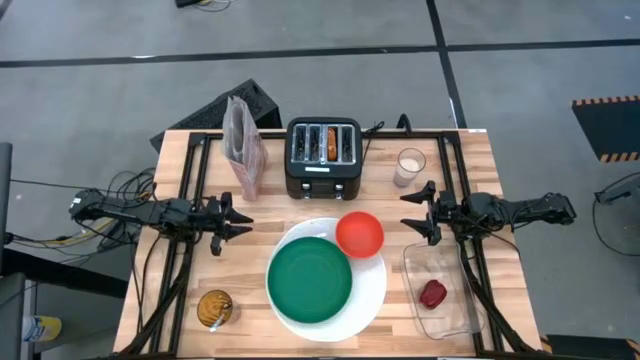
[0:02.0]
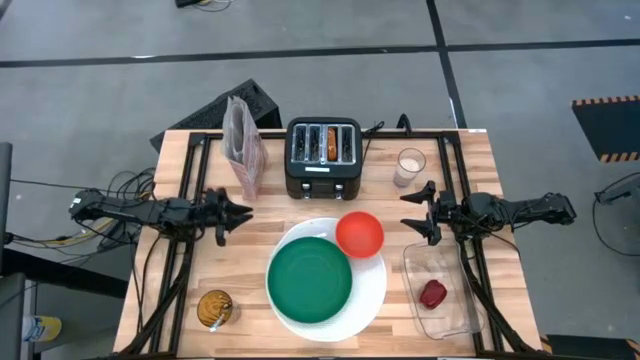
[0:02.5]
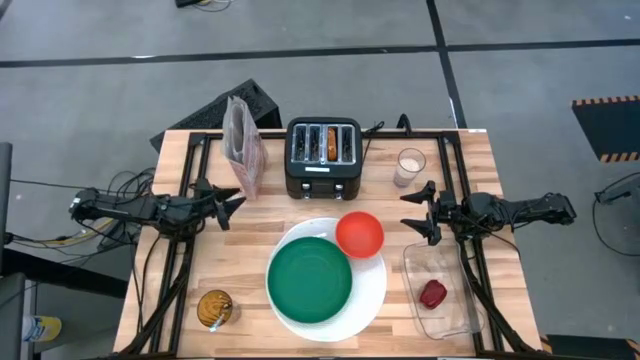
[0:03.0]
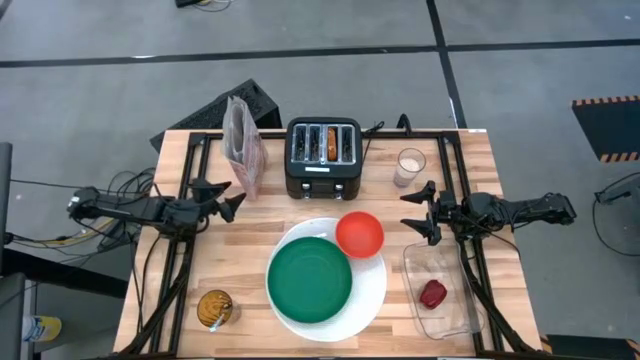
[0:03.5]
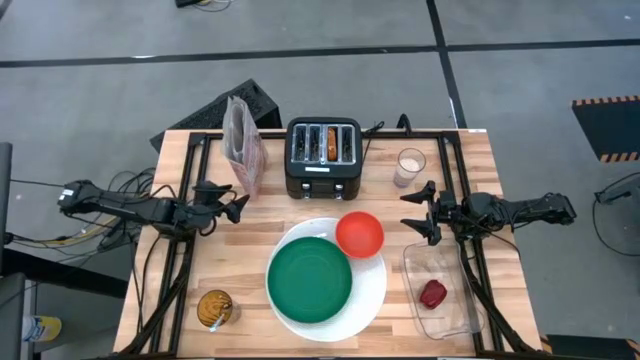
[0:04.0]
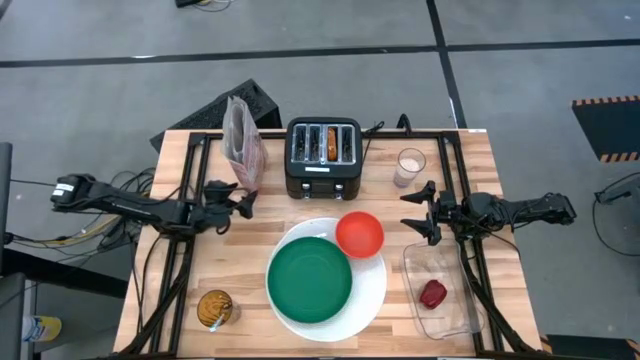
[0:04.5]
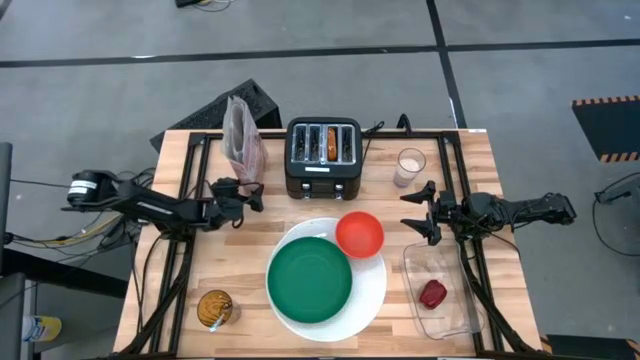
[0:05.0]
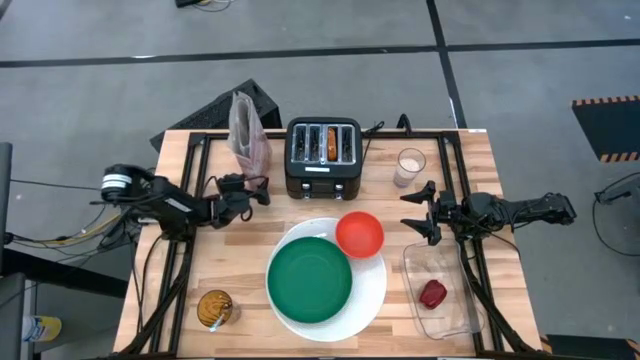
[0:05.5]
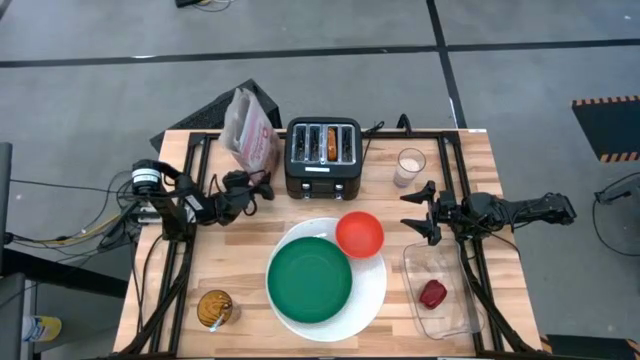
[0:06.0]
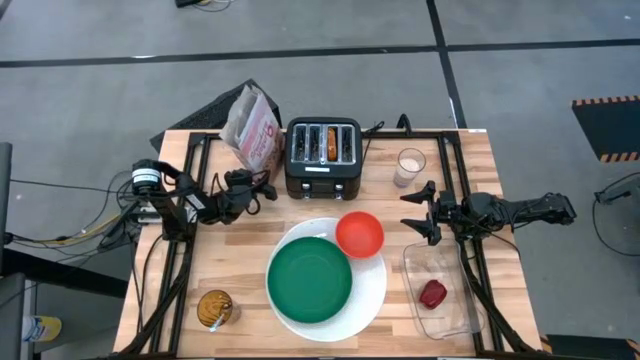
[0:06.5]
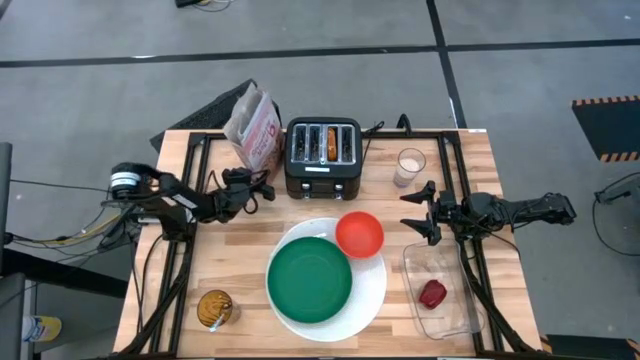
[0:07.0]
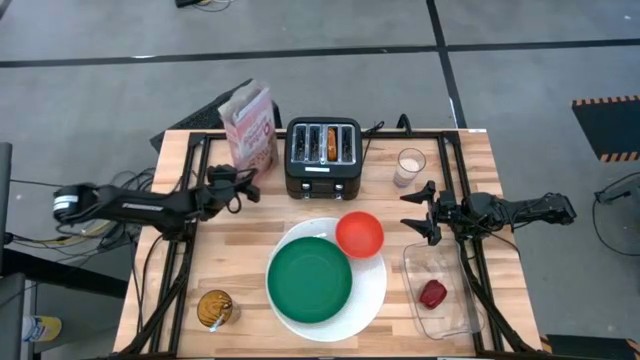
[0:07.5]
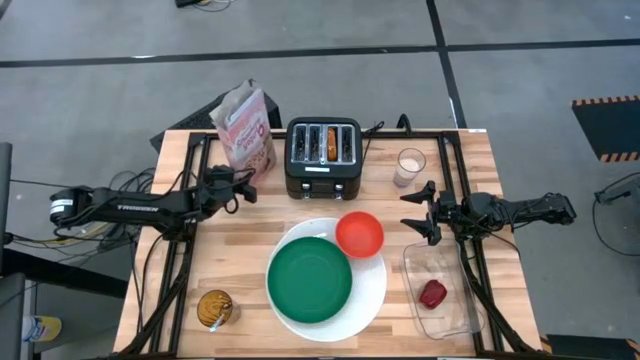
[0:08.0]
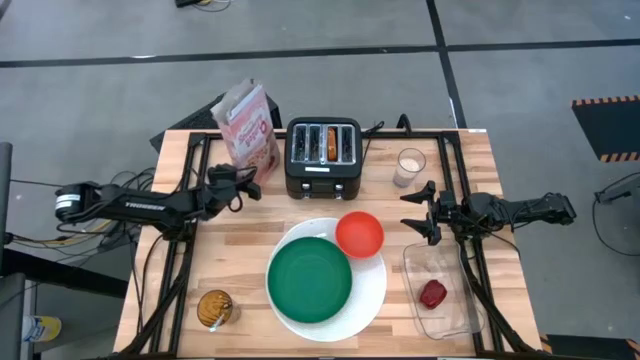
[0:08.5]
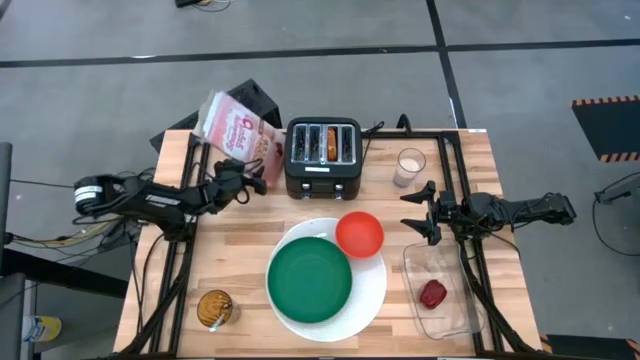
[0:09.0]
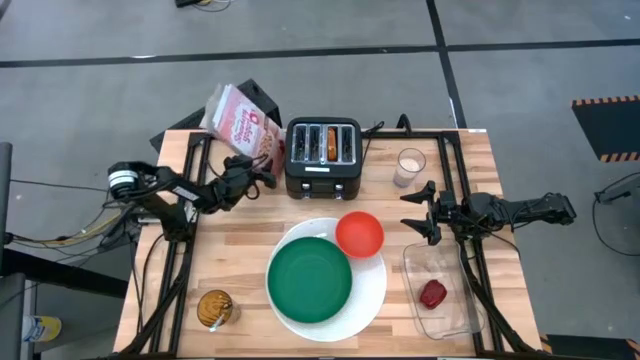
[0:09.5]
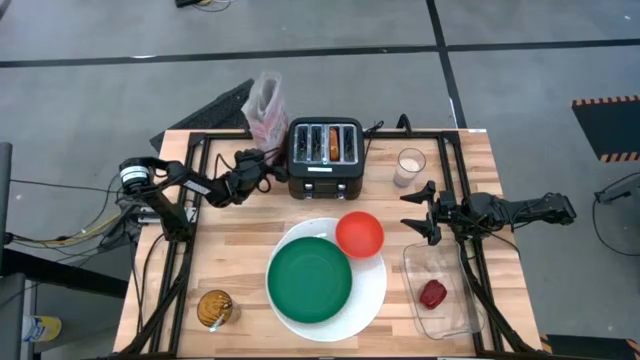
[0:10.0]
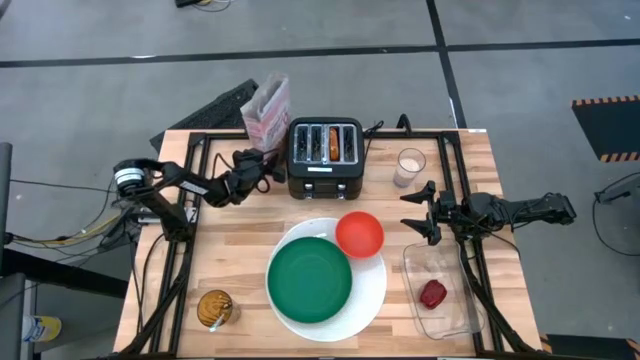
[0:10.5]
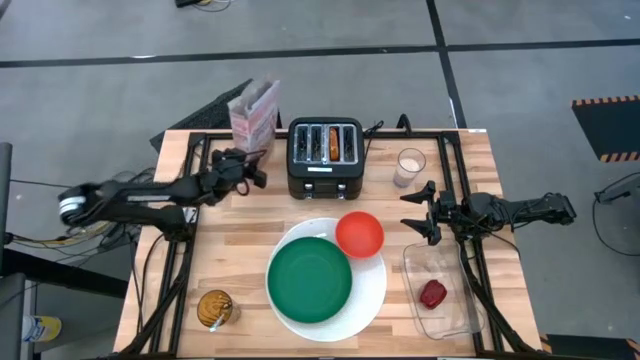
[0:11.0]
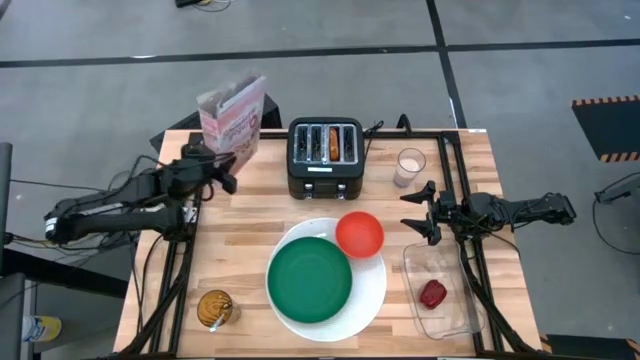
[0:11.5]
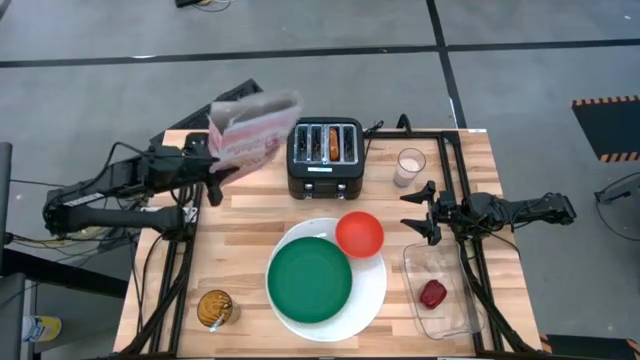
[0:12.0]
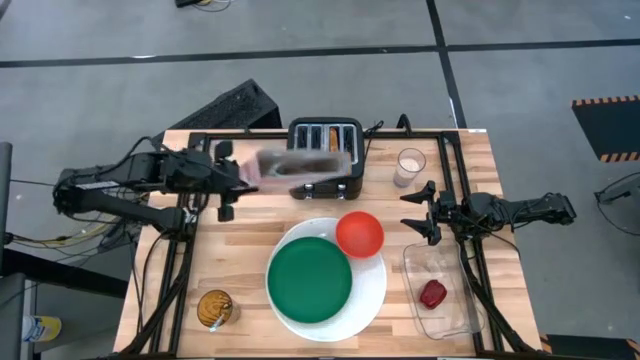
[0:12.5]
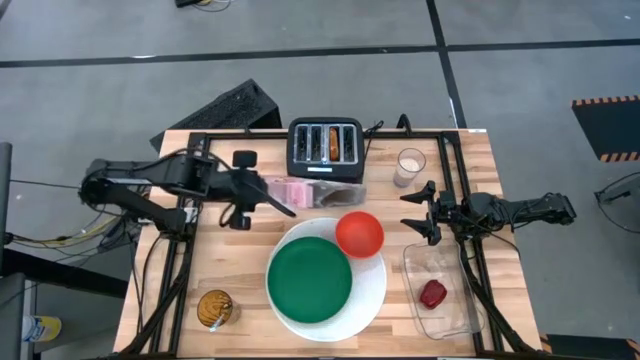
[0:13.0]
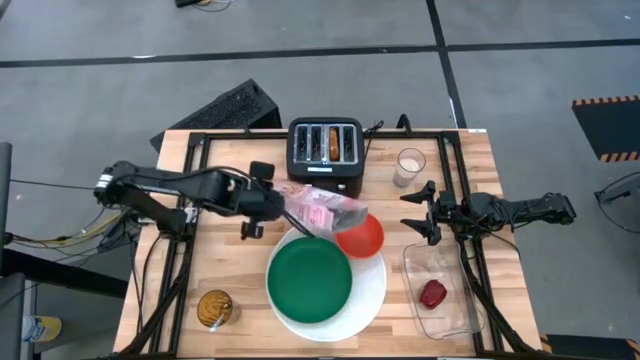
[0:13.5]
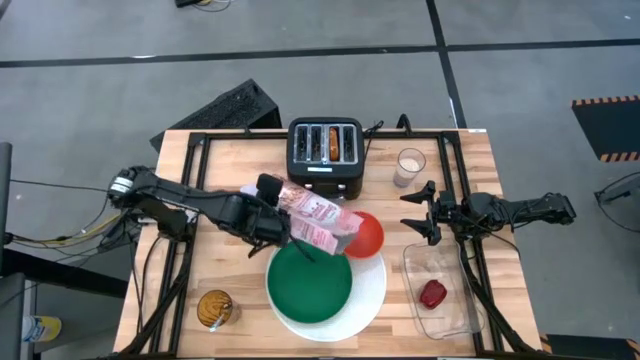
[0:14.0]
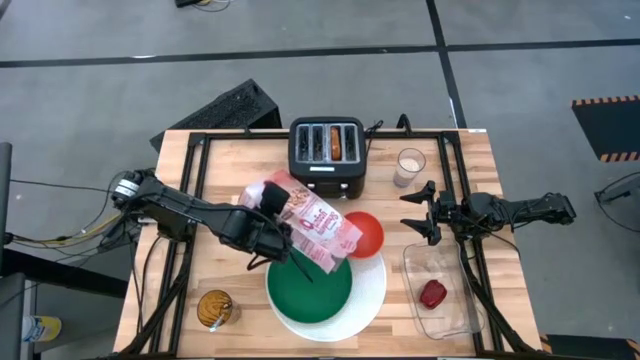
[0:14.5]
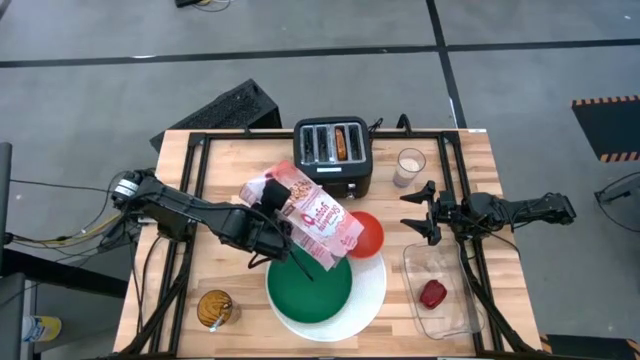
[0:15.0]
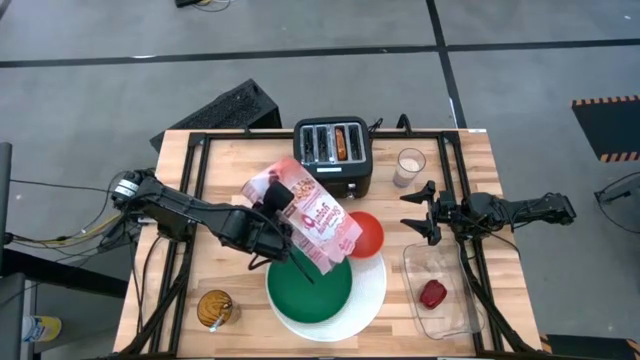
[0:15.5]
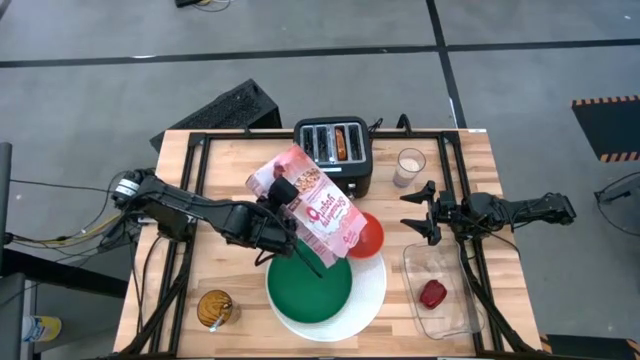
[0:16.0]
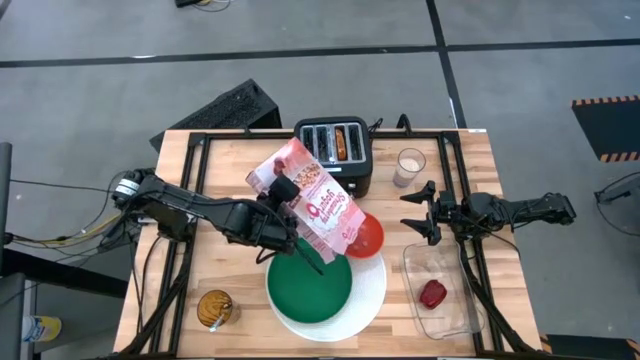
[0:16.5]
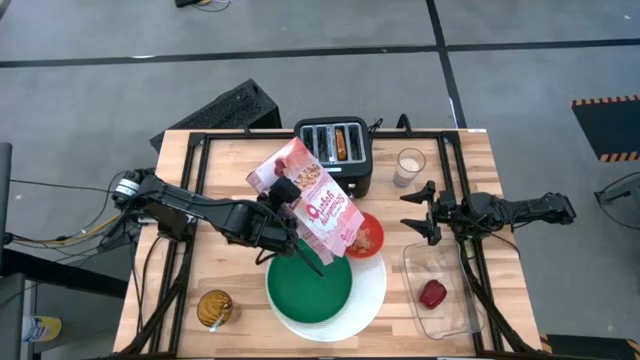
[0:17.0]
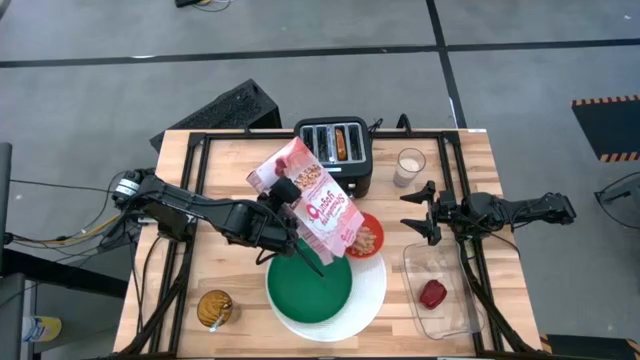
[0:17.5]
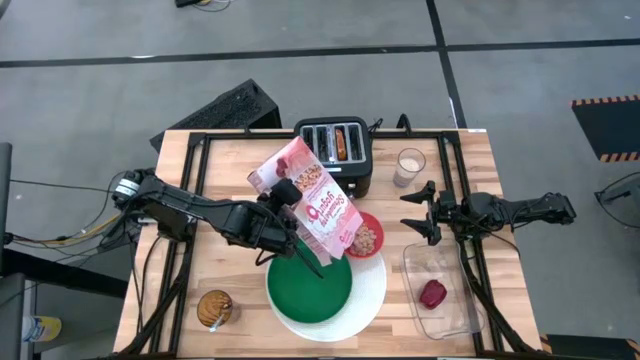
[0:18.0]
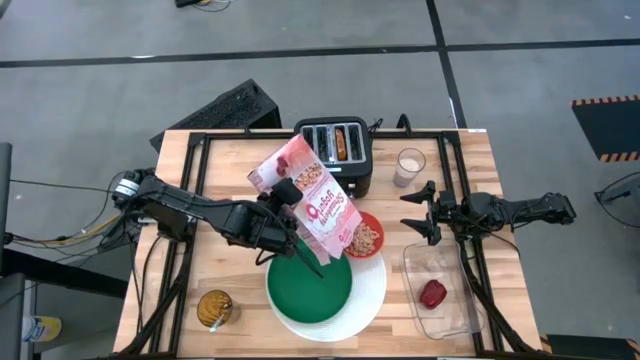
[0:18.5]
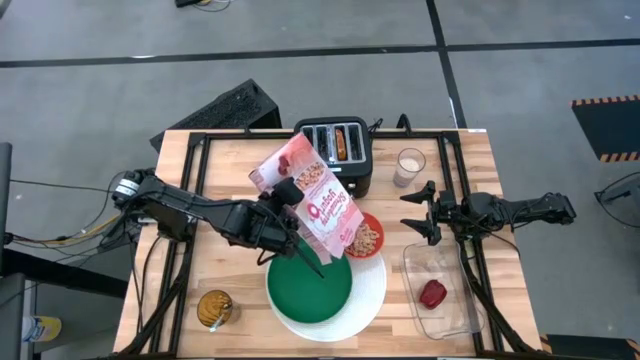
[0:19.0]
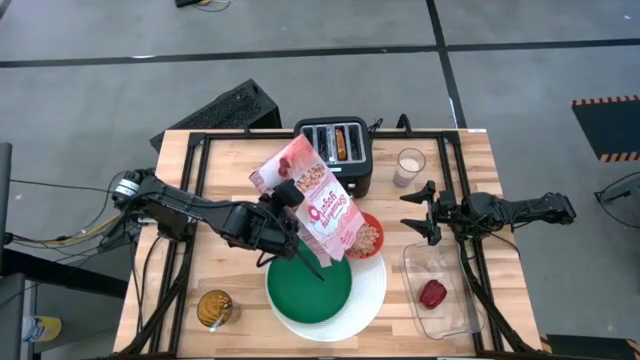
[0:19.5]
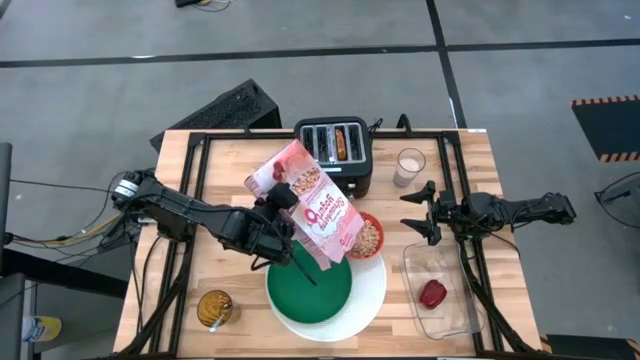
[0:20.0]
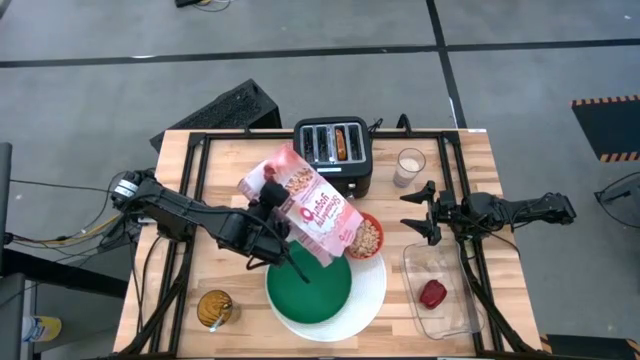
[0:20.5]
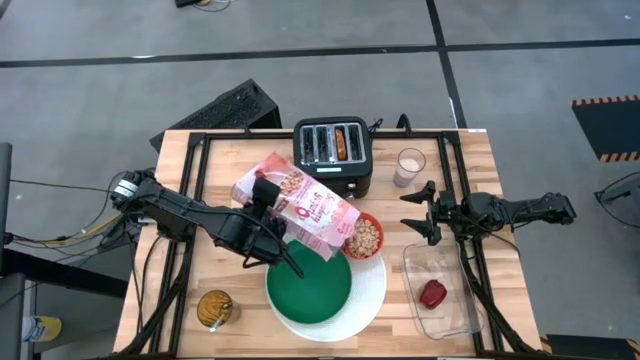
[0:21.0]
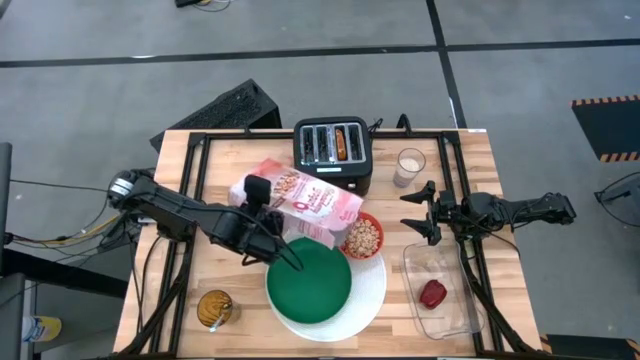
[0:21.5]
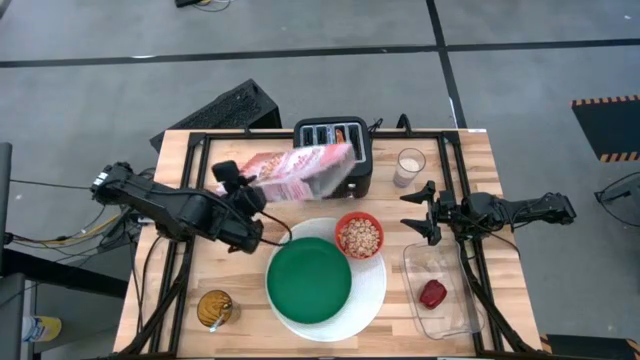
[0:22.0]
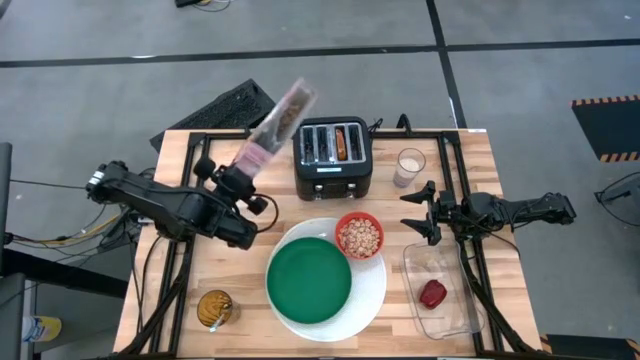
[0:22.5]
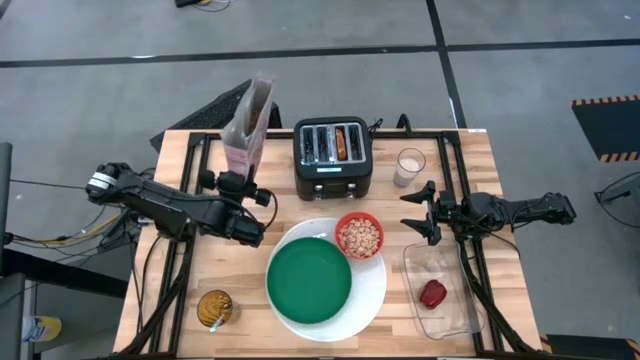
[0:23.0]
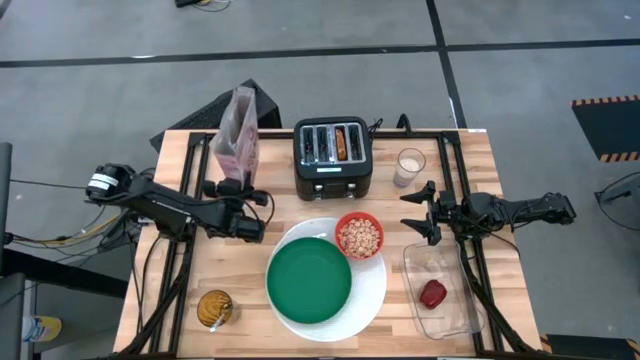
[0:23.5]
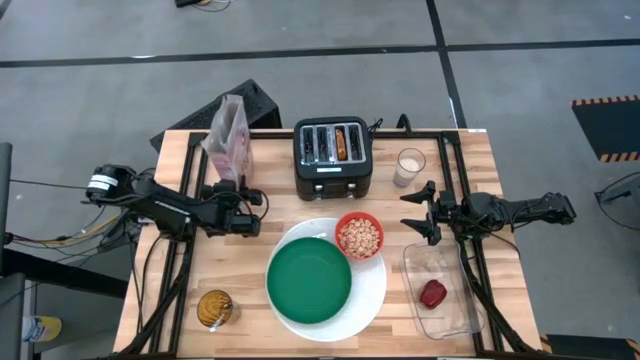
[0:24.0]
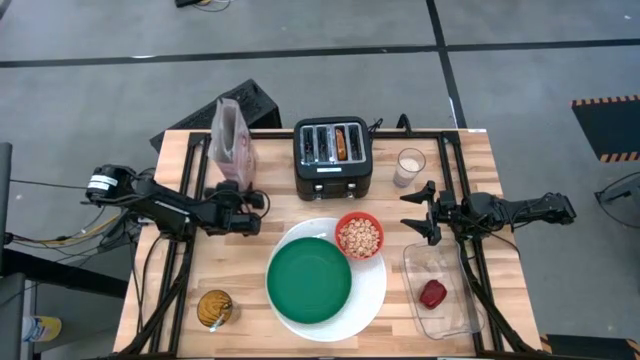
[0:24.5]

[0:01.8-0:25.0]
Task: Arrange a breakfast setting
Pour the pink cereal box into the orange bowl
